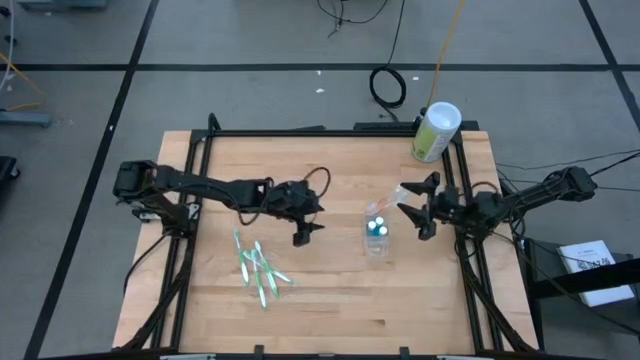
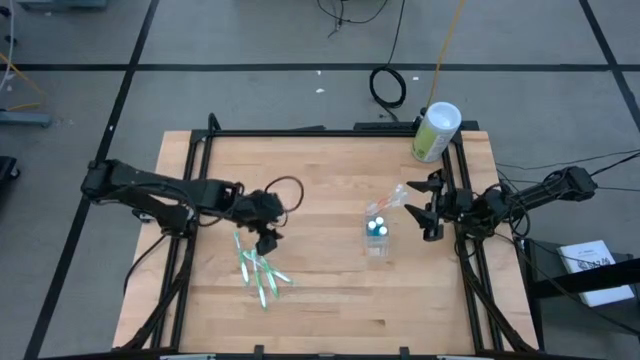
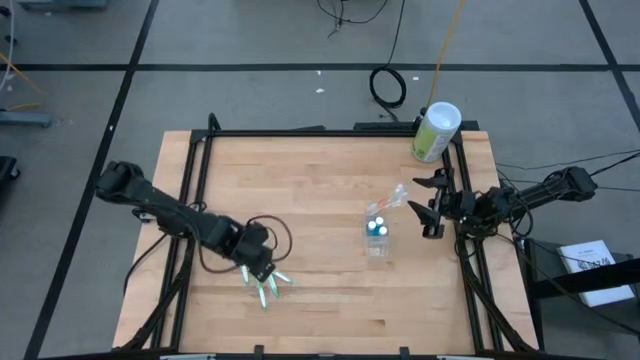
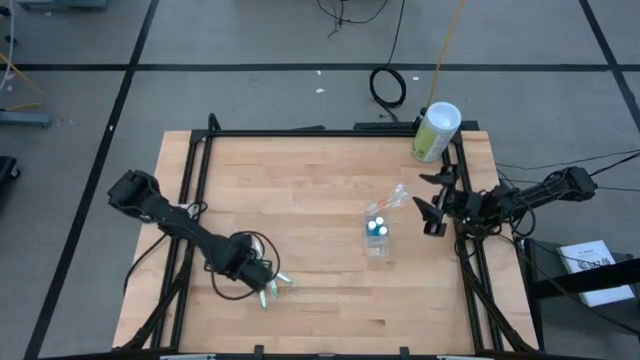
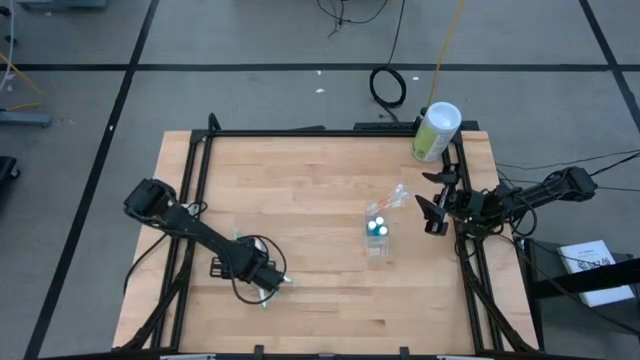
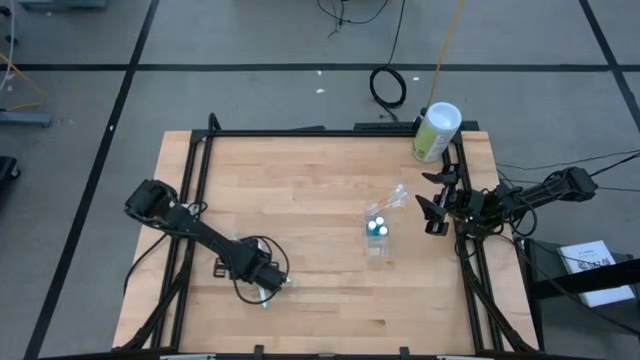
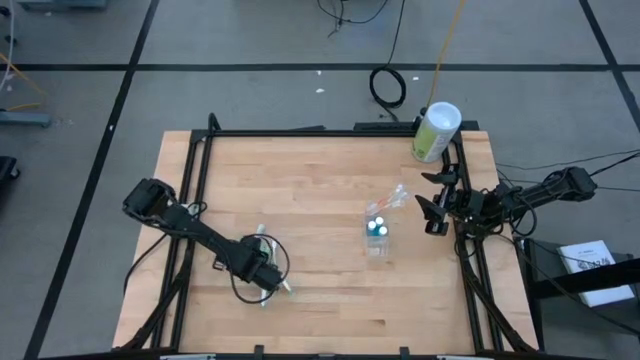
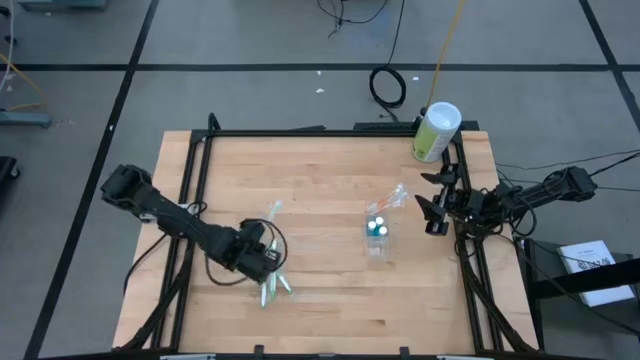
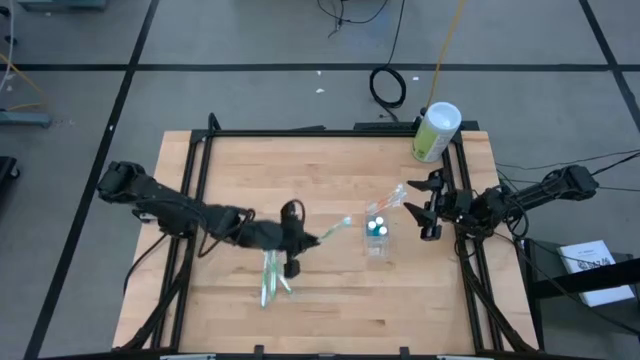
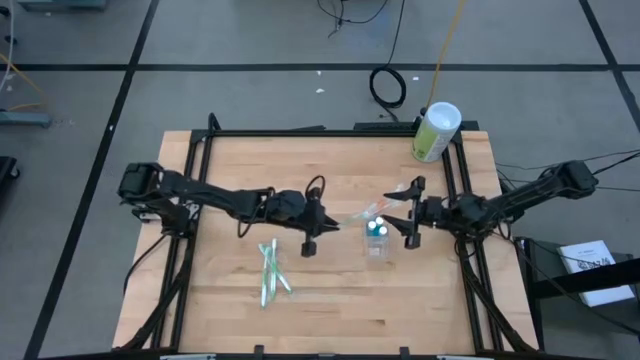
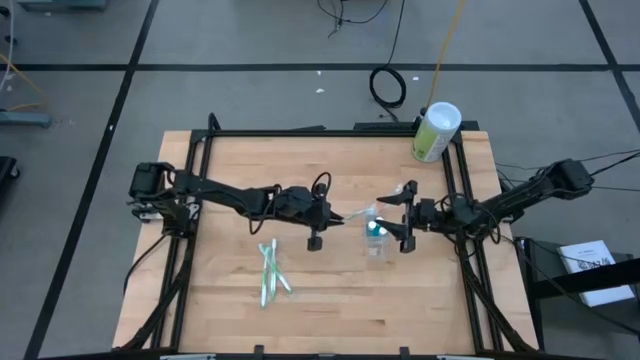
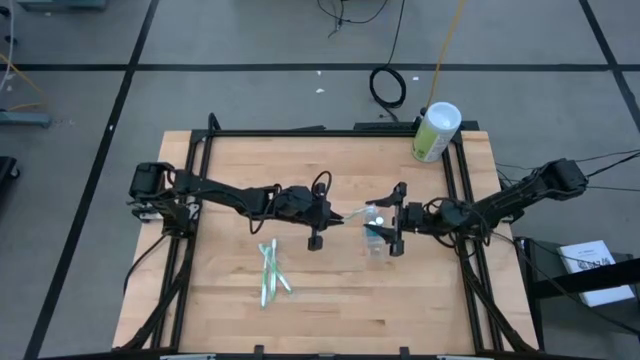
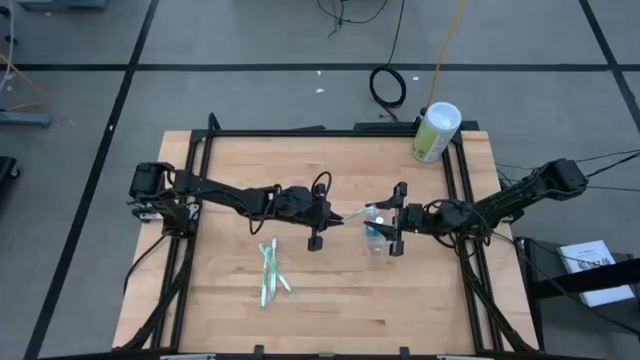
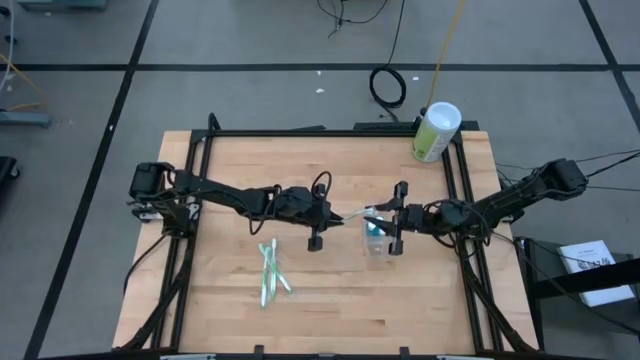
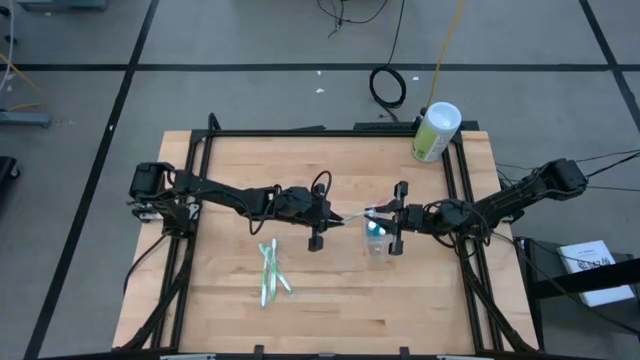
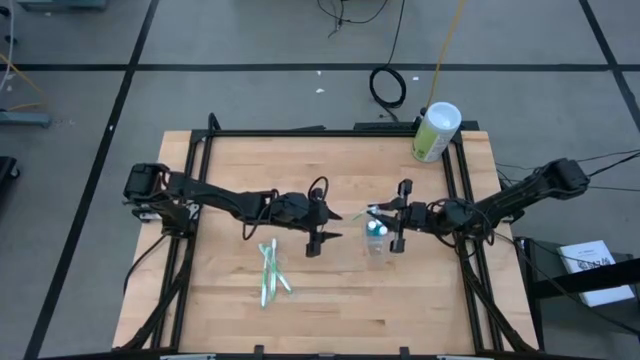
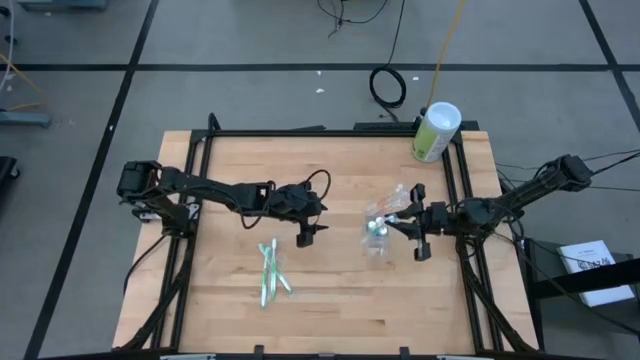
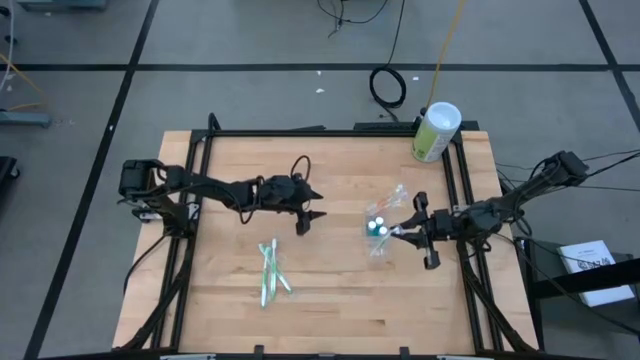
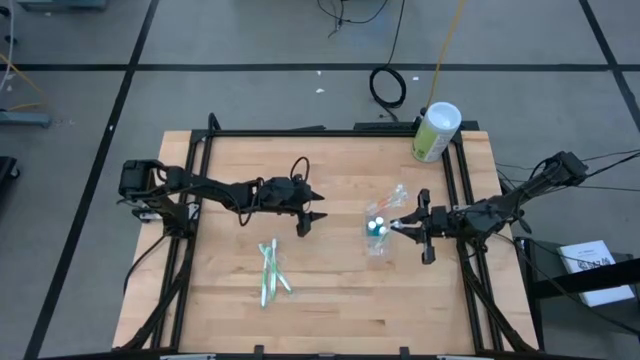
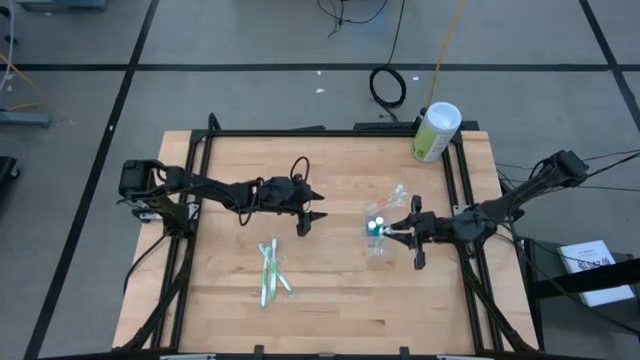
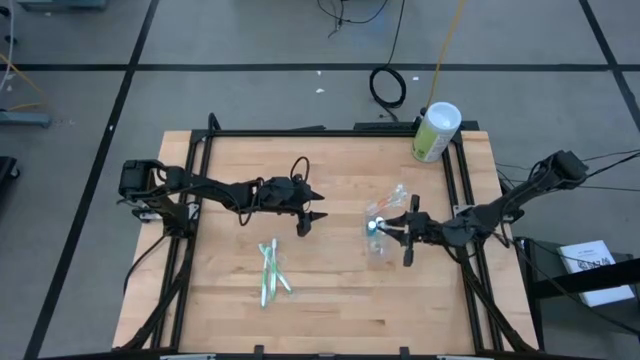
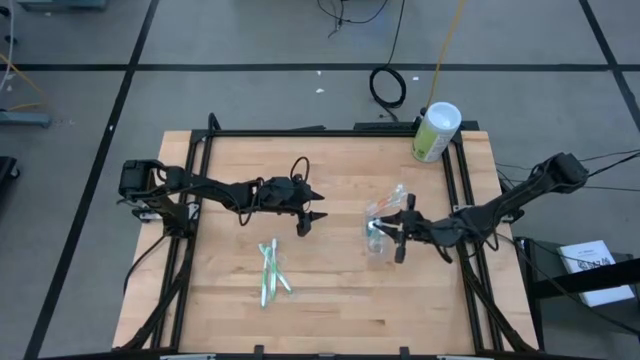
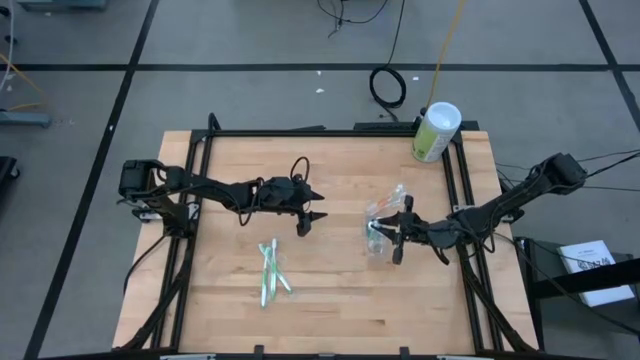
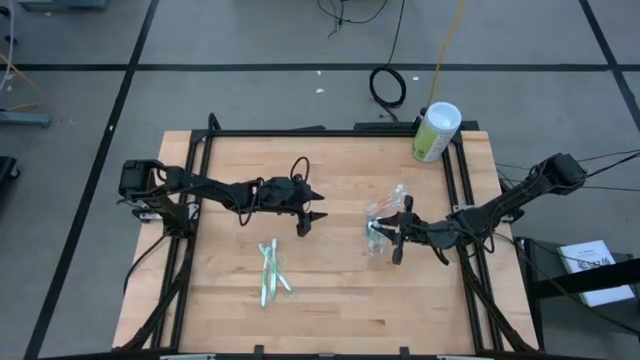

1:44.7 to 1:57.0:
Task: Pick & Place toothbrushing station
Put the green toothbrush into the bottom of the transparent organizer

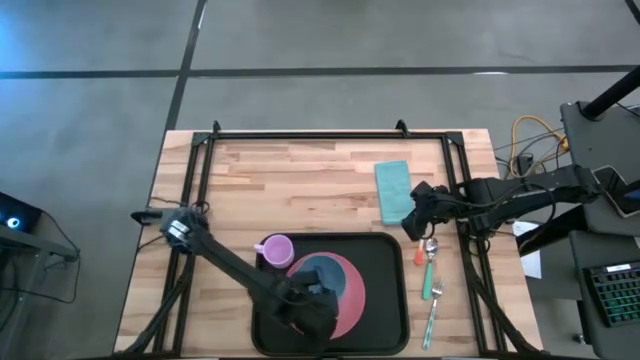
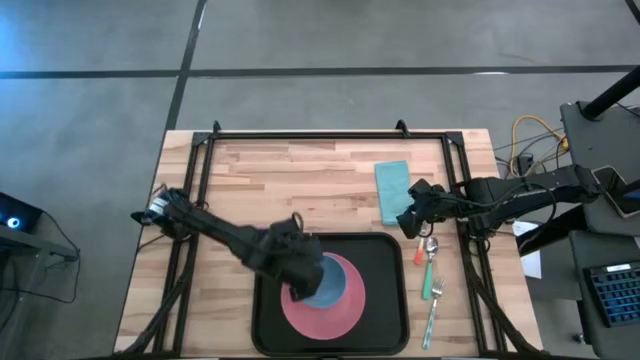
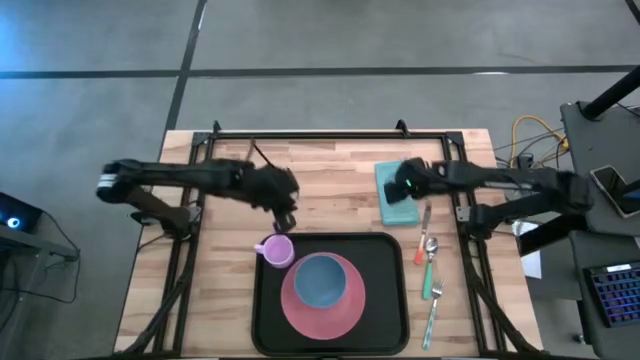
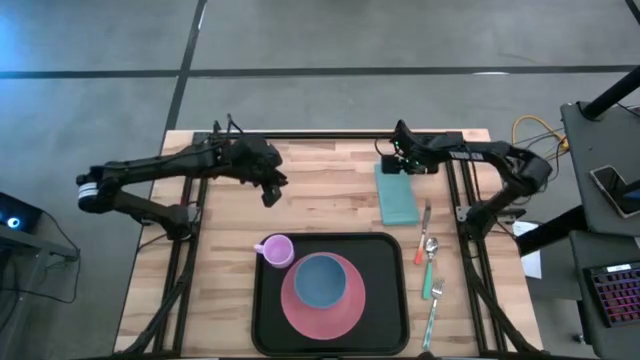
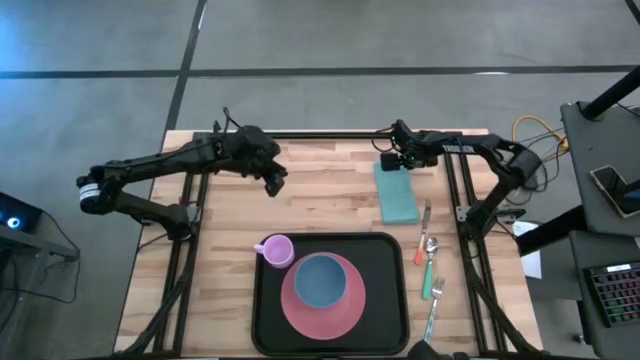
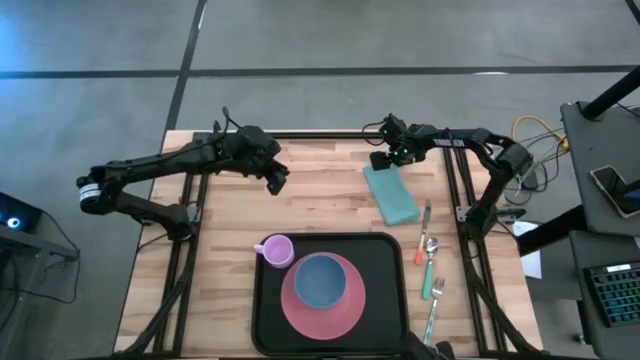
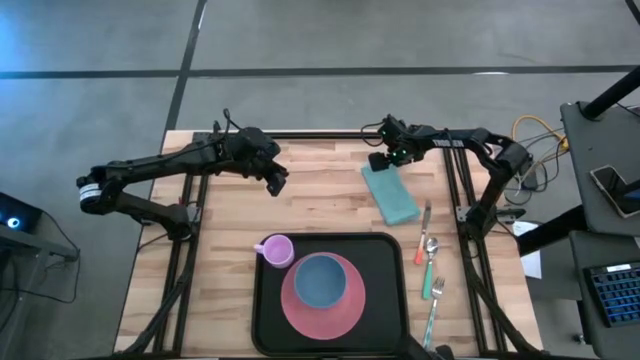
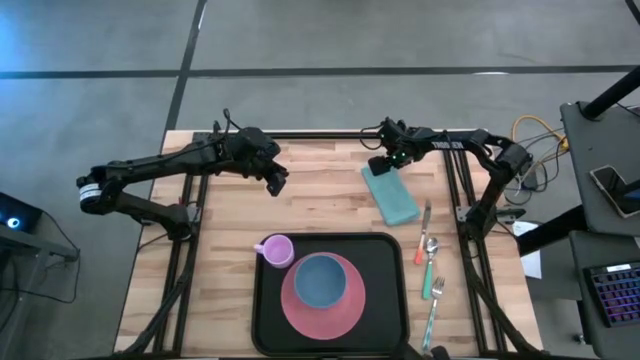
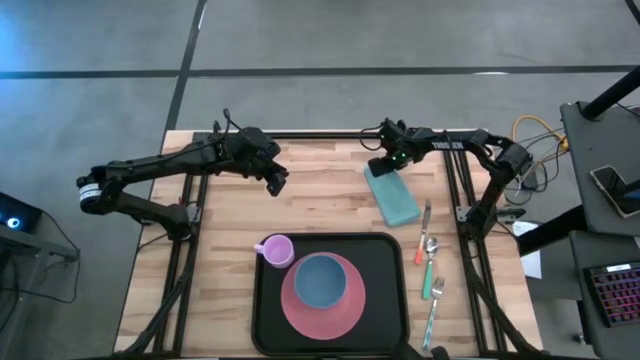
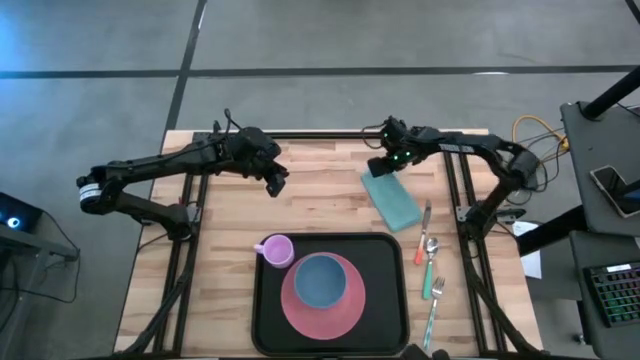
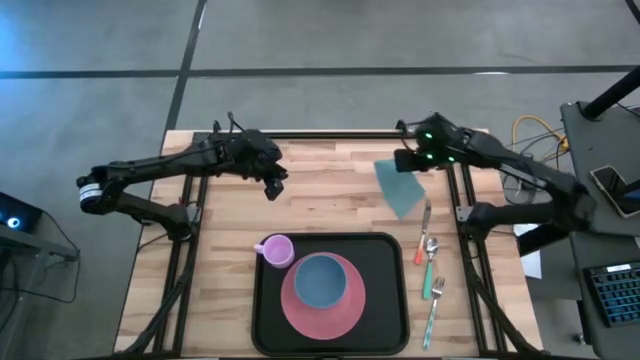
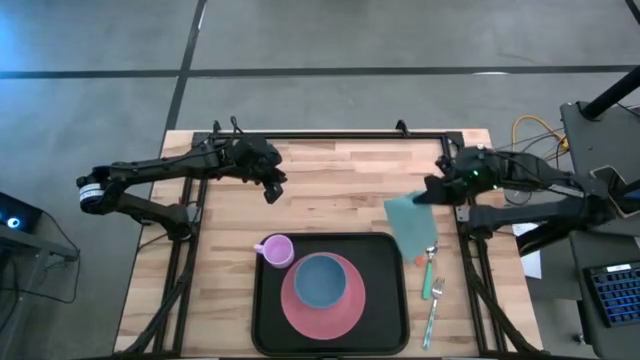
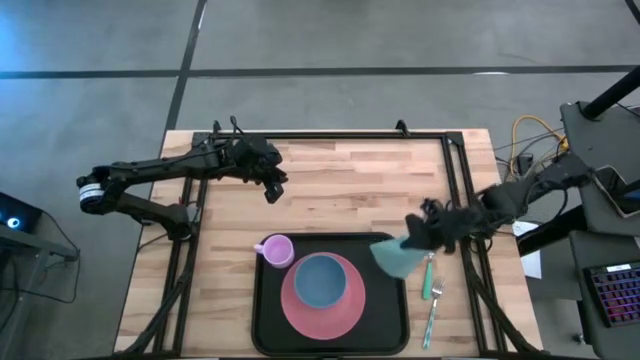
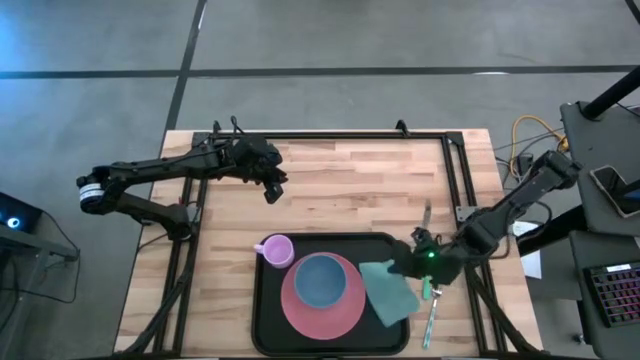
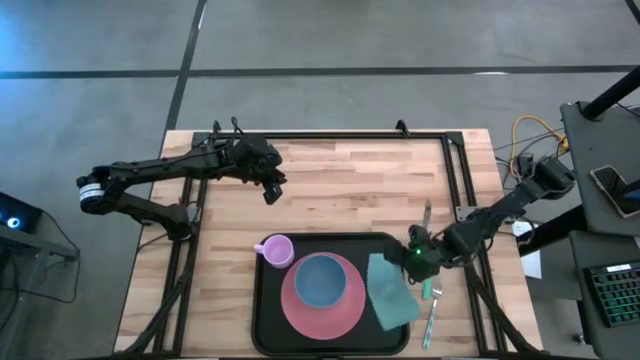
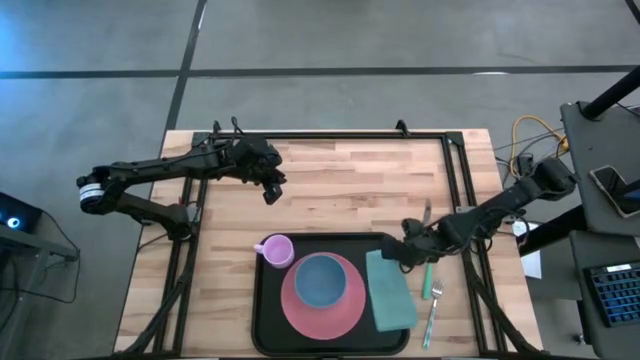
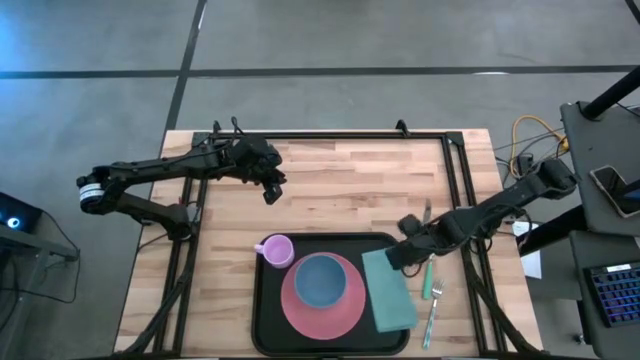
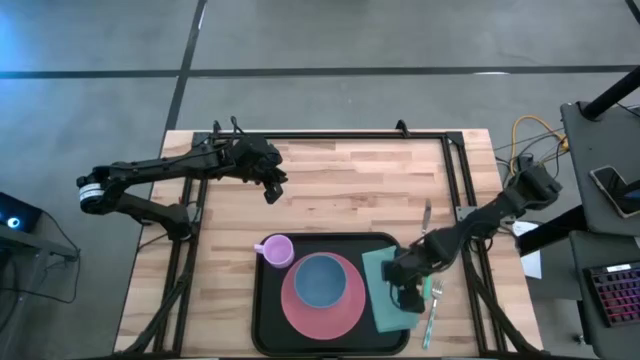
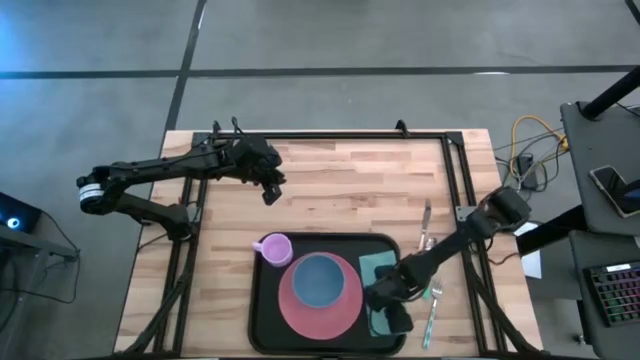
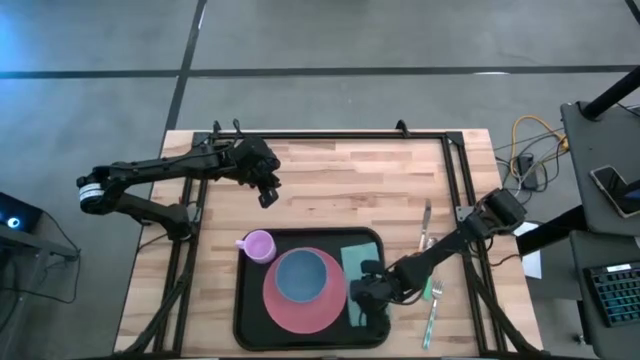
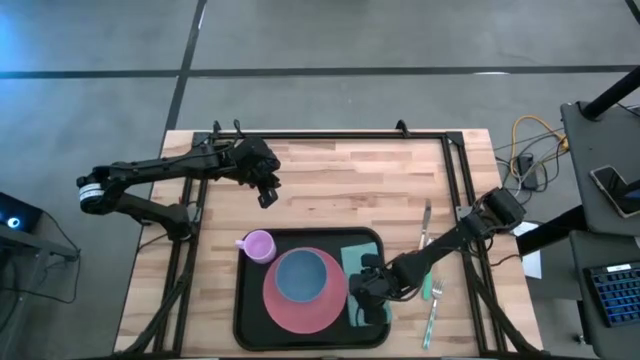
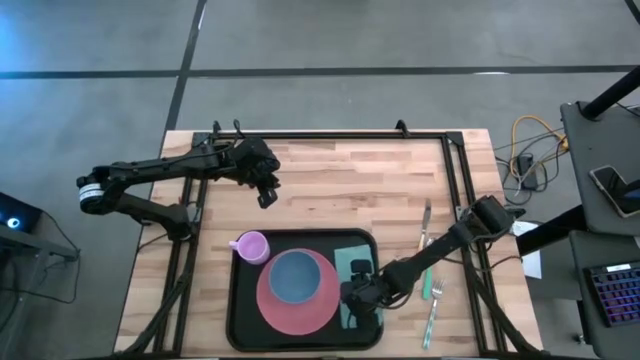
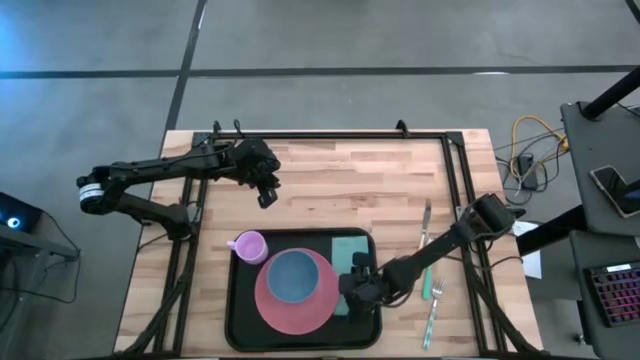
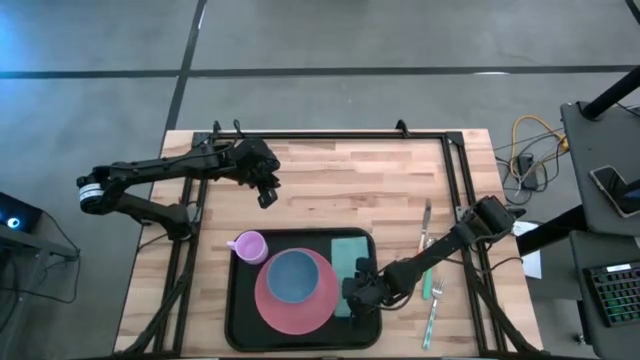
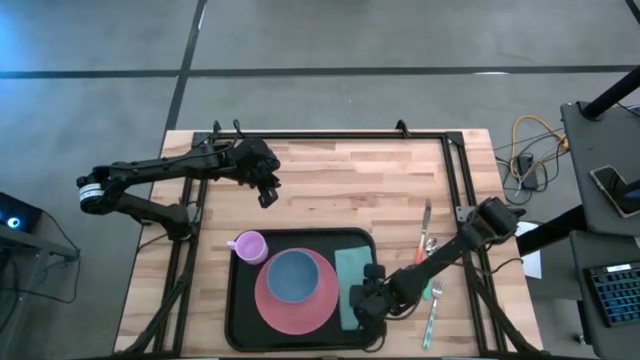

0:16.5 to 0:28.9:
Task: Set up tray
Put the light blue napkin on the black serving tray
